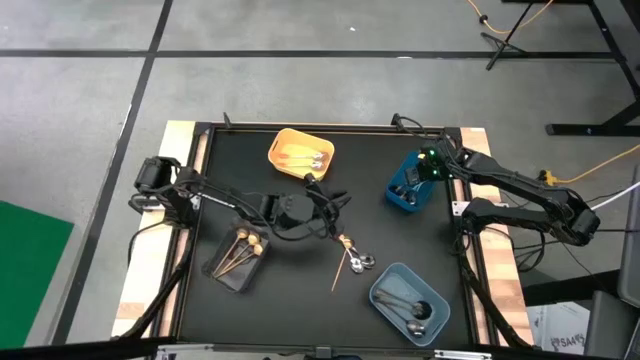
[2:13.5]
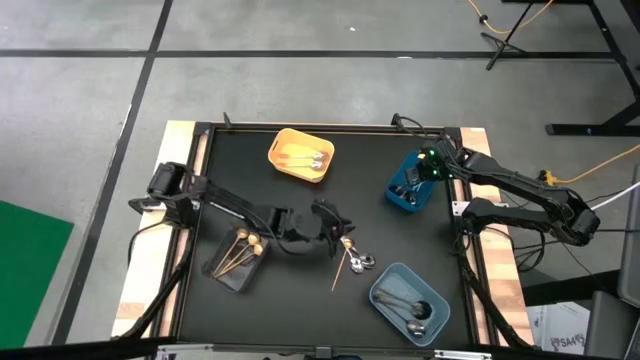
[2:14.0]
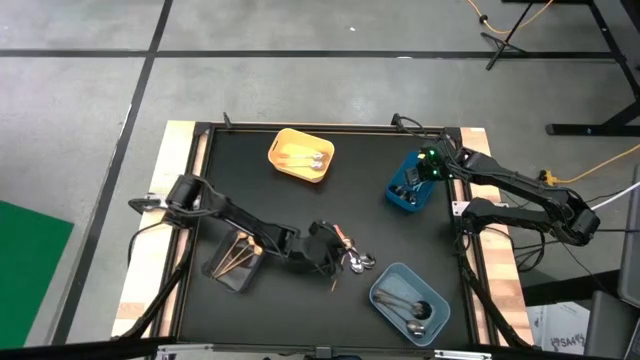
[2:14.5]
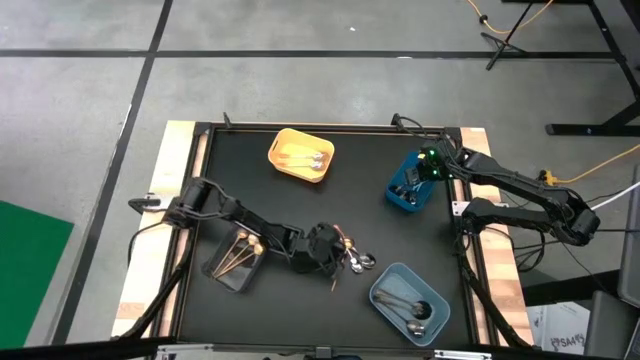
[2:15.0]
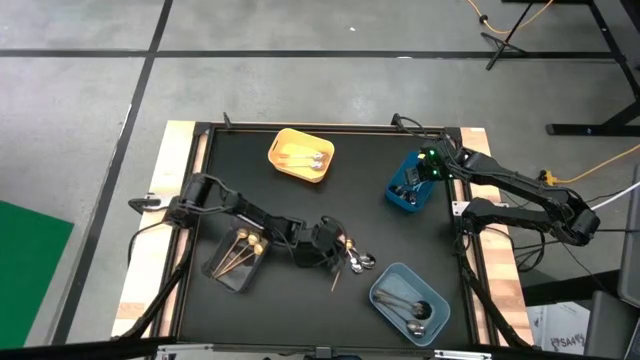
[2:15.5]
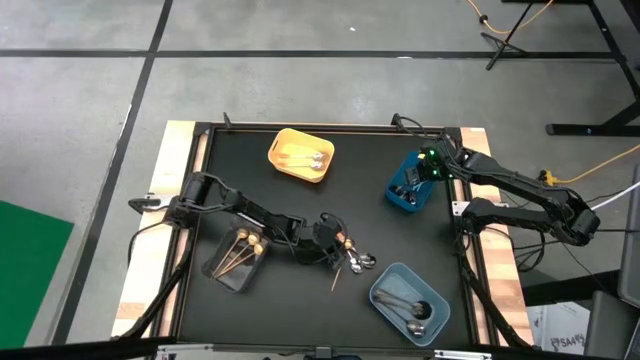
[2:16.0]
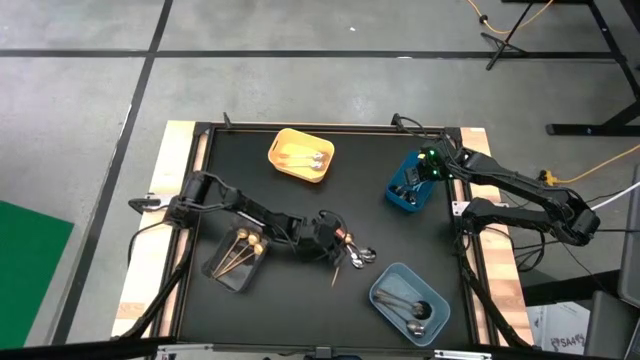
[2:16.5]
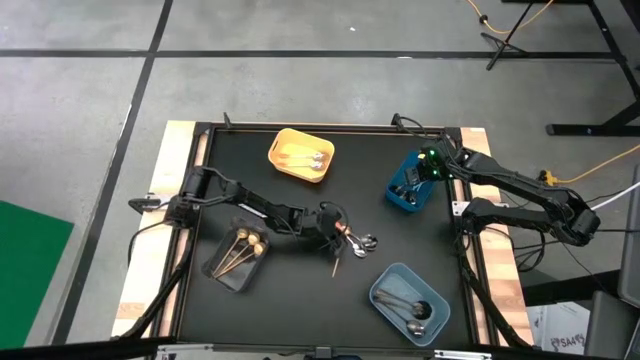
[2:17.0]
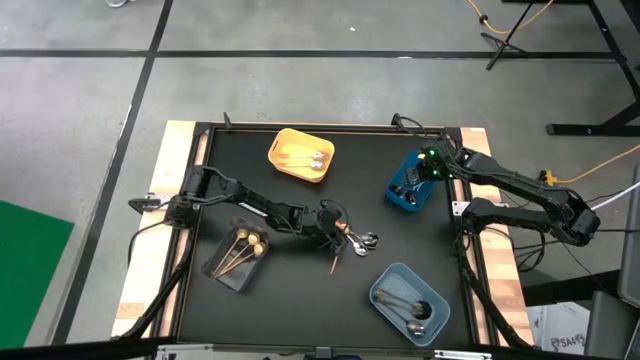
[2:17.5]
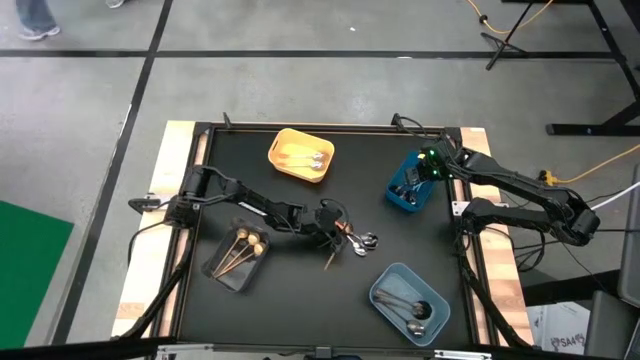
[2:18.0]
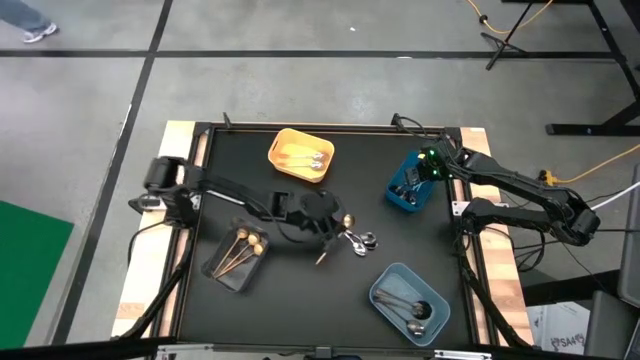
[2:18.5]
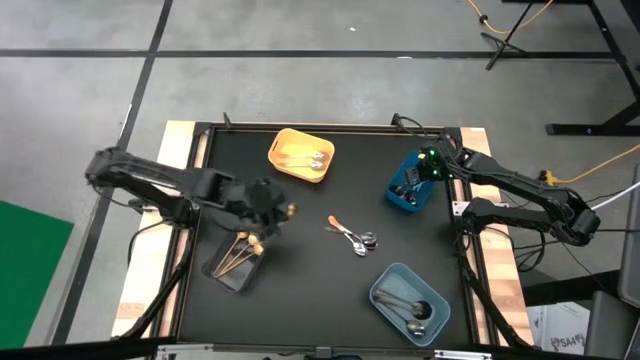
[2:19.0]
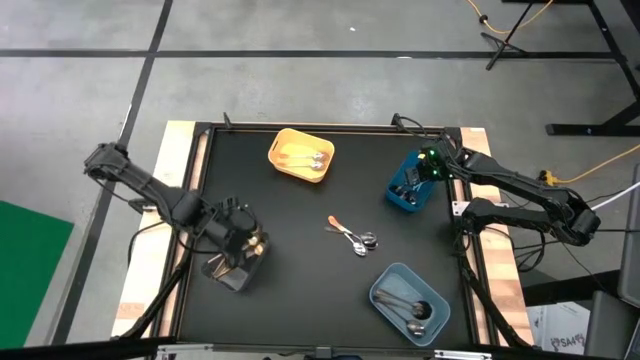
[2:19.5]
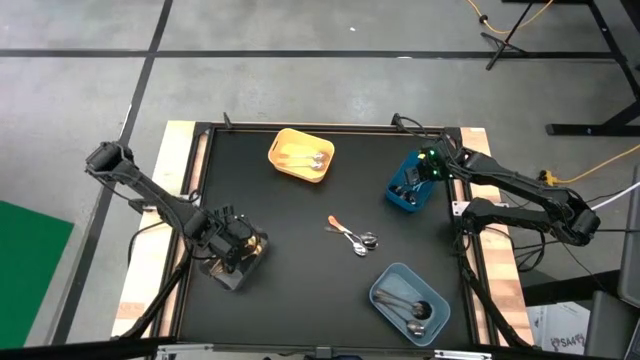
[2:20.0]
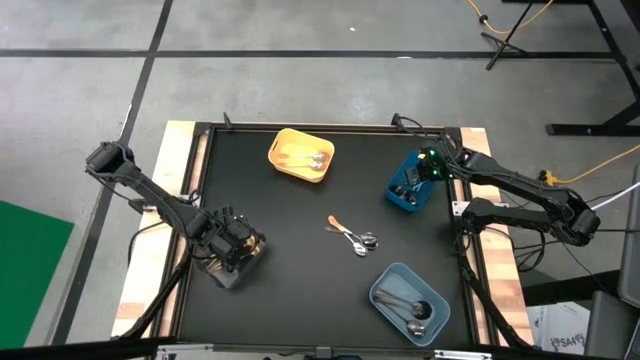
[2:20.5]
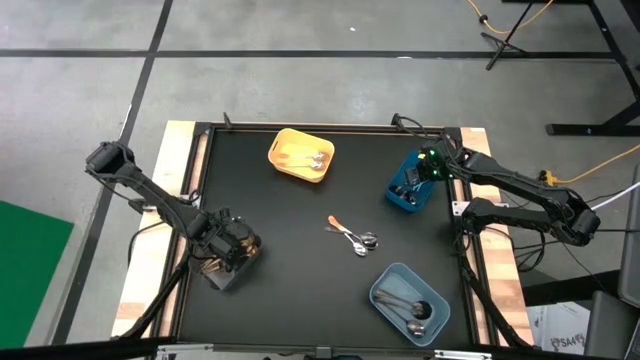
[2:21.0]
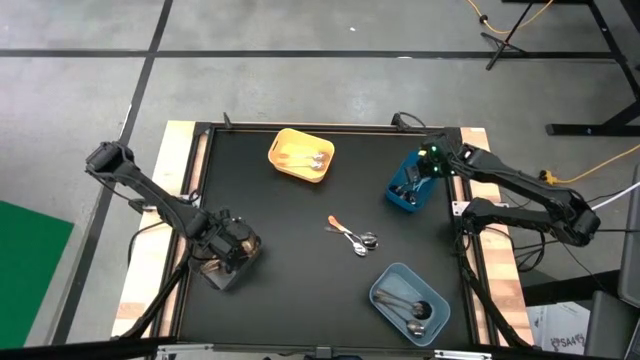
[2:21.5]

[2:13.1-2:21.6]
Task: Sort silverware by color (type)
Put the gold spoon into the black bin

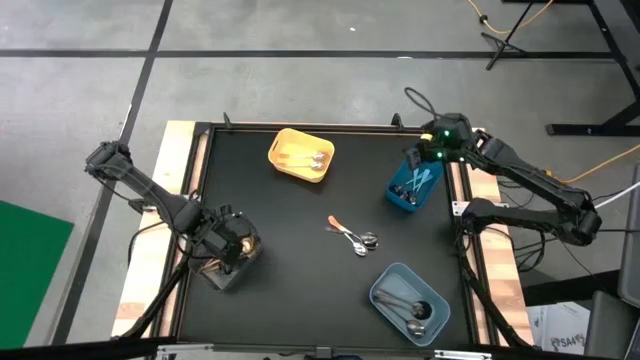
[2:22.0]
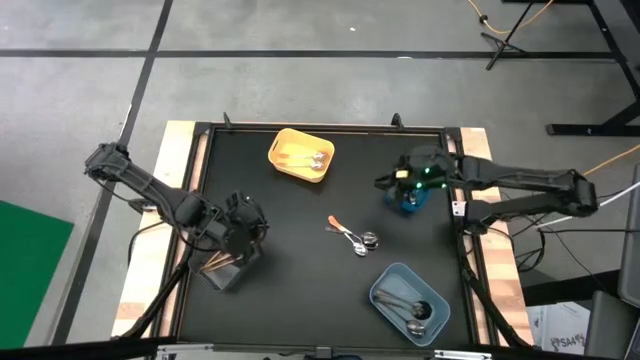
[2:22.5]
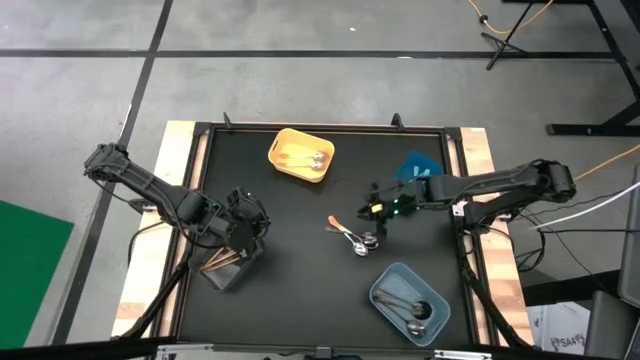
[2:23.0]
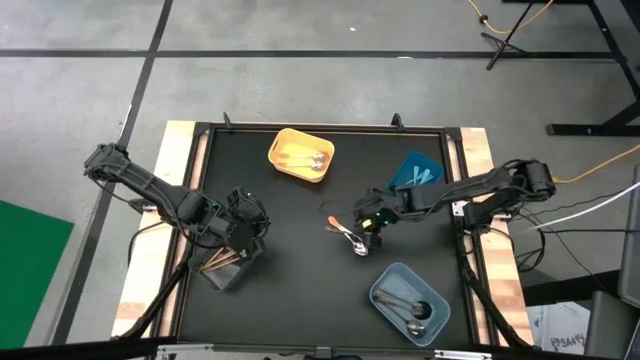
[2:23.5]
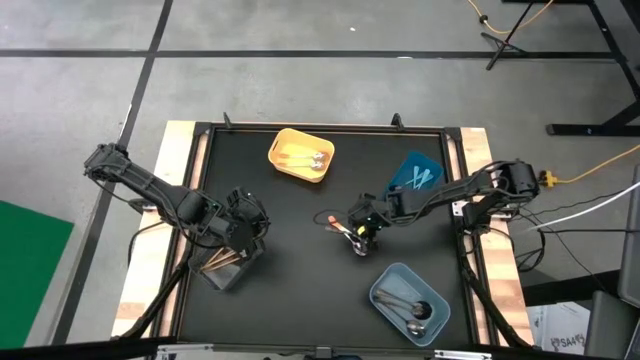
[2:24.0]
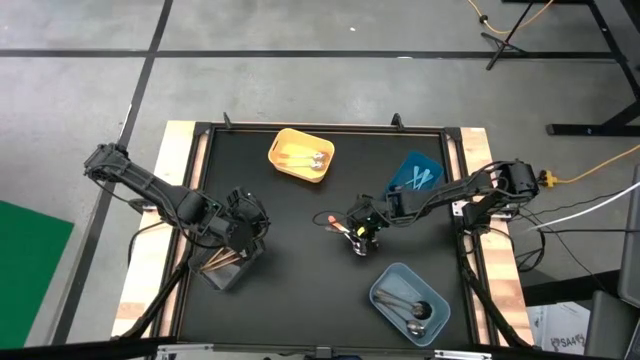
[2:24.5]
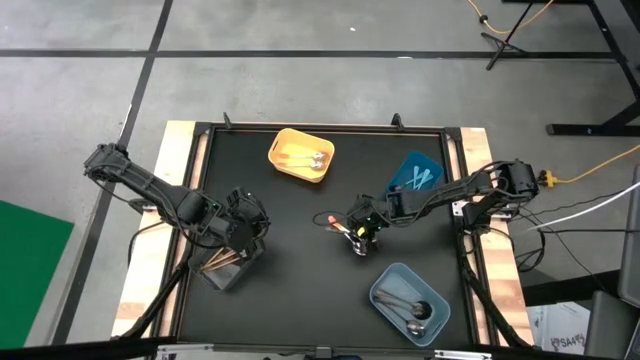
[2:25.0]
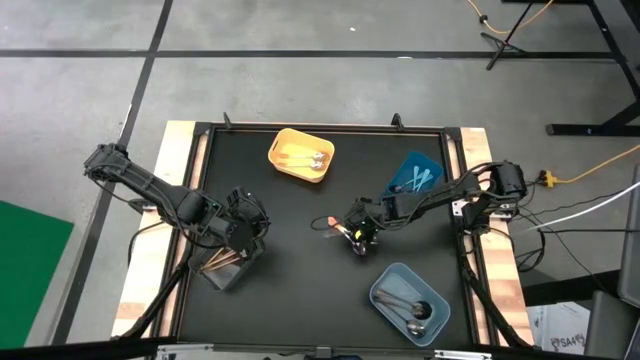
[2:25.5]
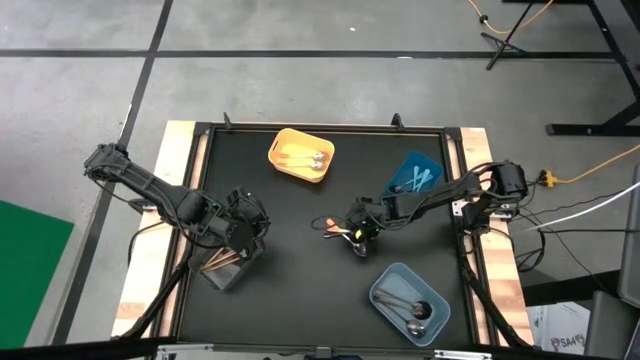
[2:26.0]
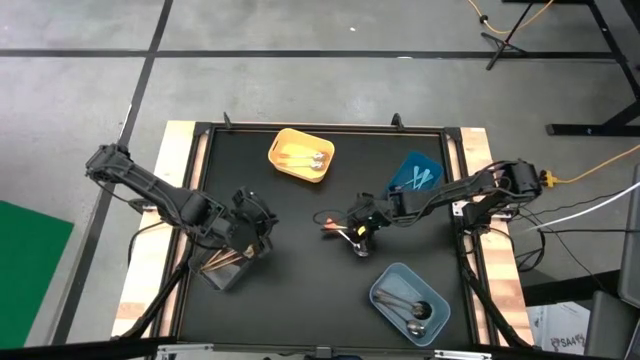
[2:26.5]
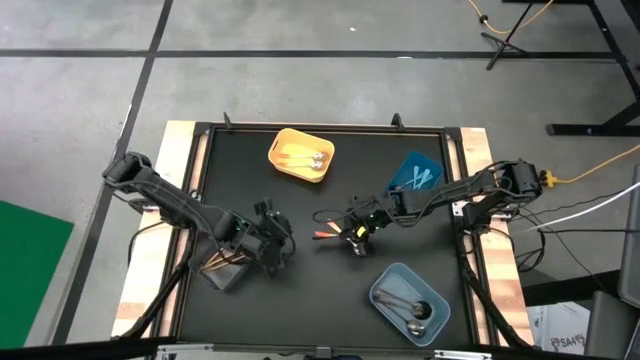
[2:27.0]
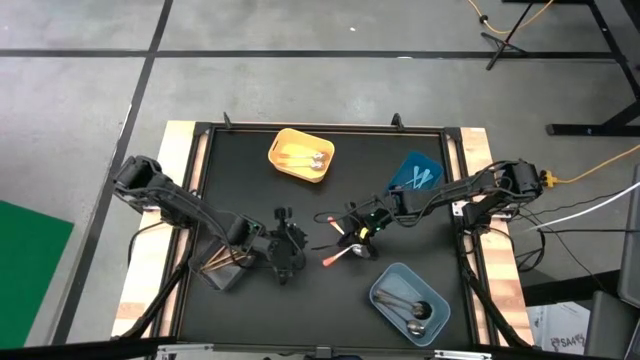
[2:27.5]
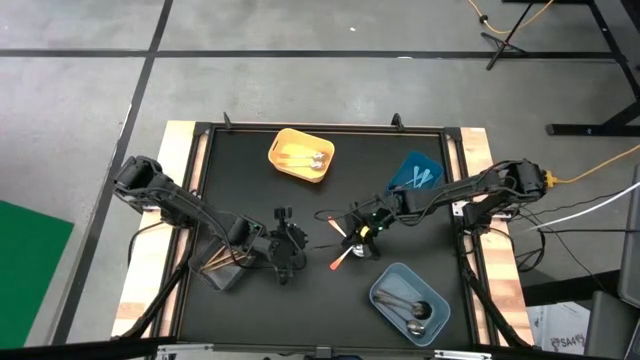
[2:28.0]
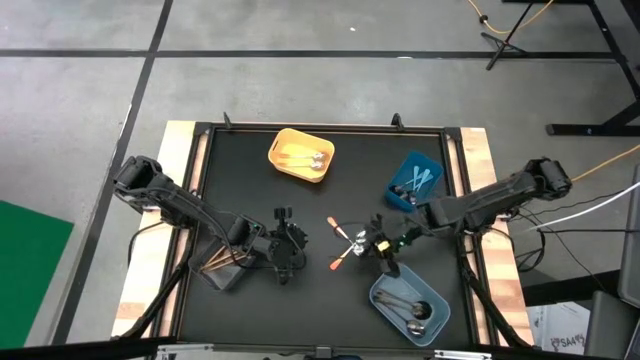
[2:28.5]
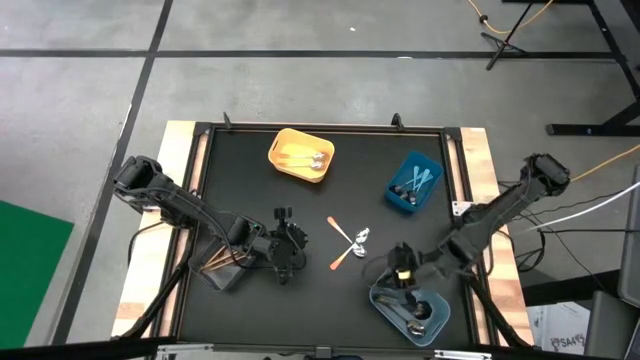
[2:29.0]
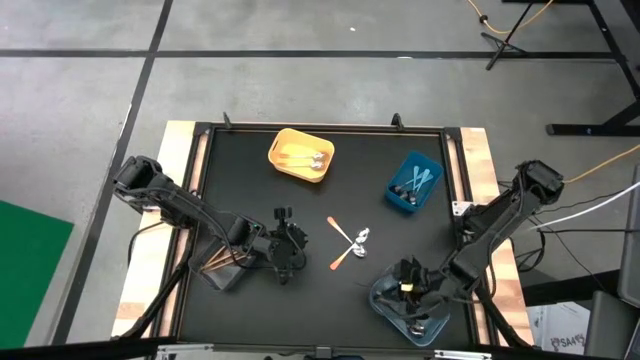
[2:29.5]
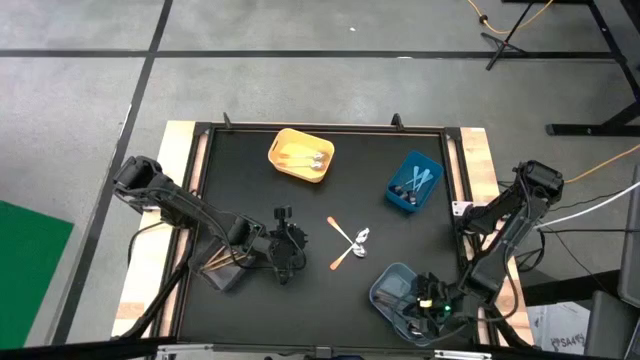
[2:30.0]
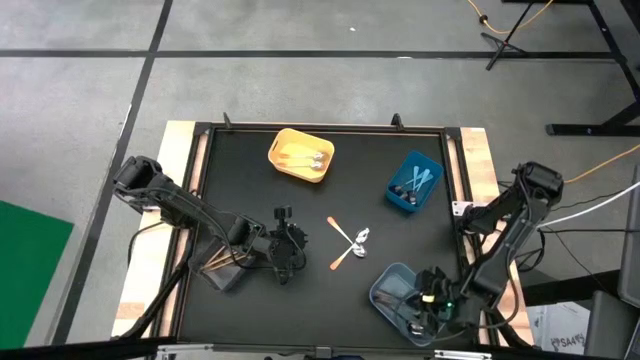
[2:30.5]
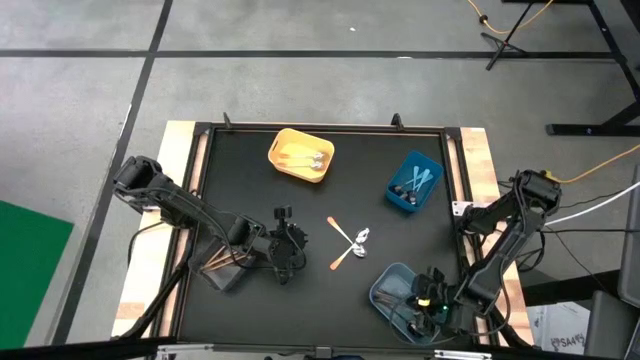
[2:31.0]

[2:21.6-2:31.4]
Put the black spoon into the light blue bin
